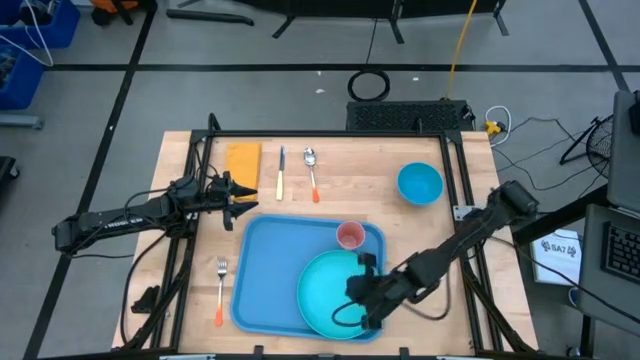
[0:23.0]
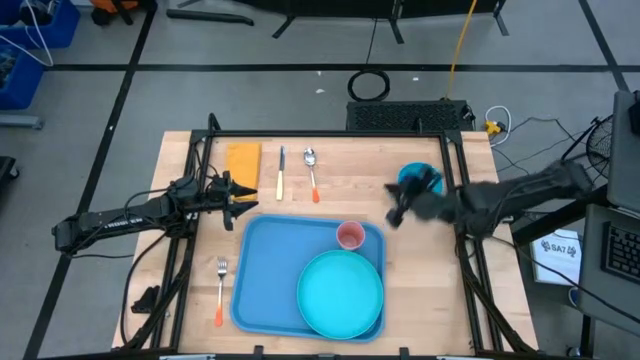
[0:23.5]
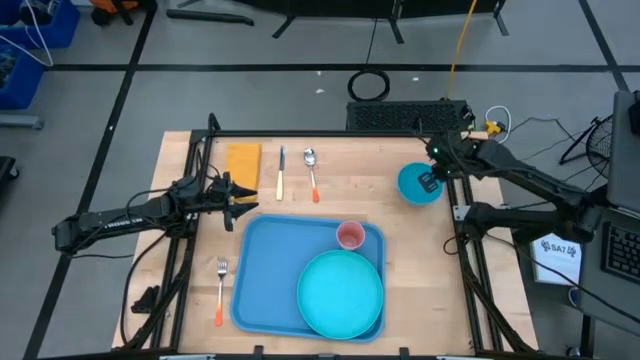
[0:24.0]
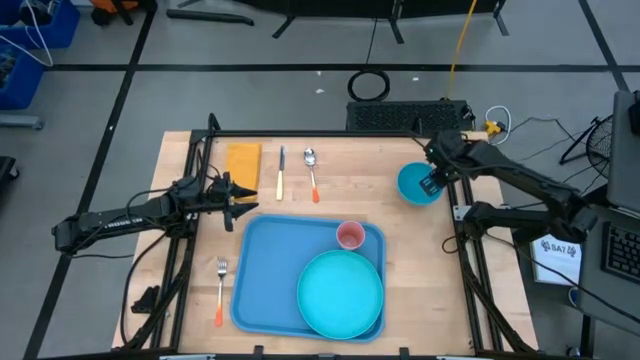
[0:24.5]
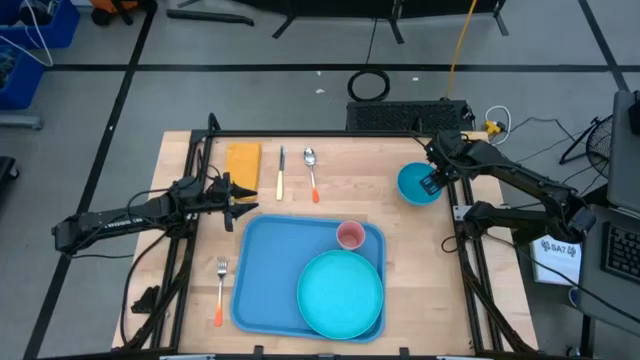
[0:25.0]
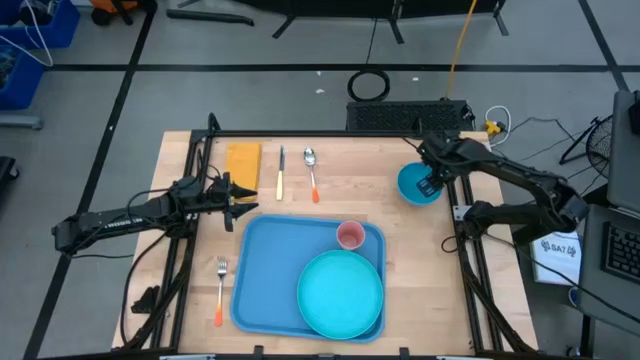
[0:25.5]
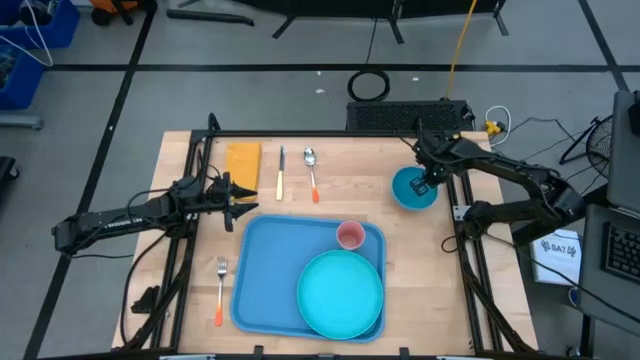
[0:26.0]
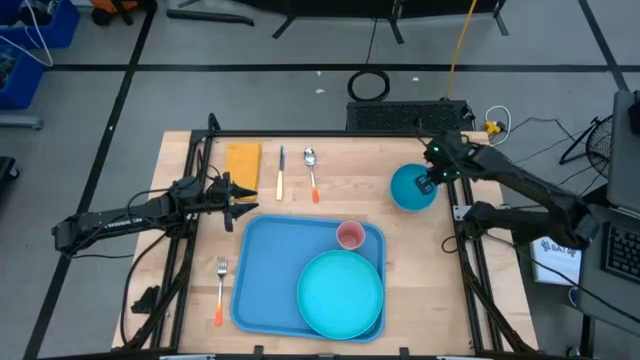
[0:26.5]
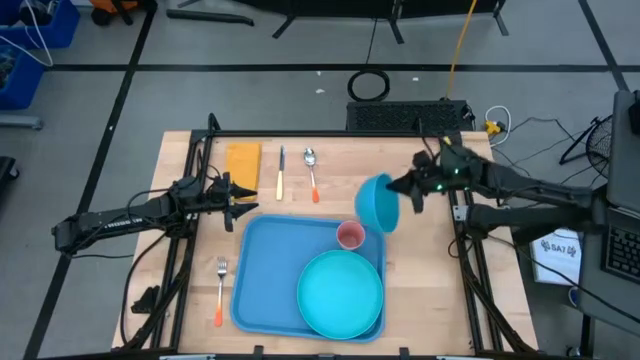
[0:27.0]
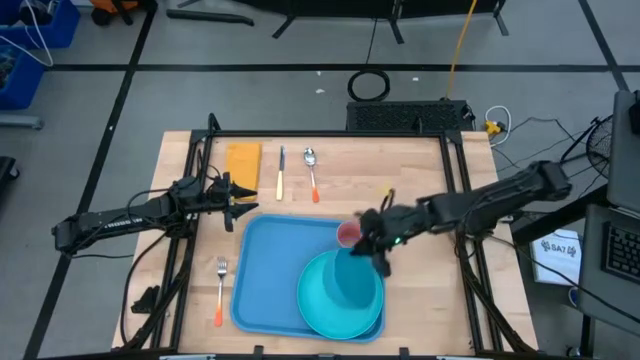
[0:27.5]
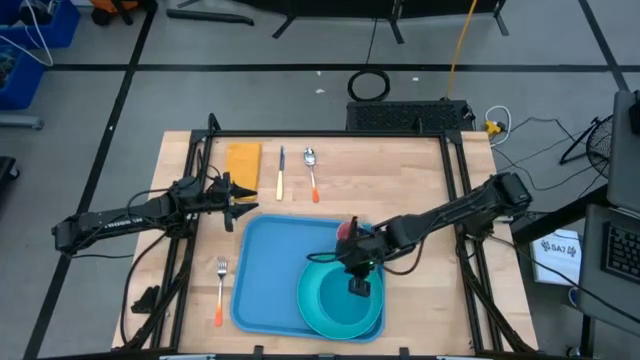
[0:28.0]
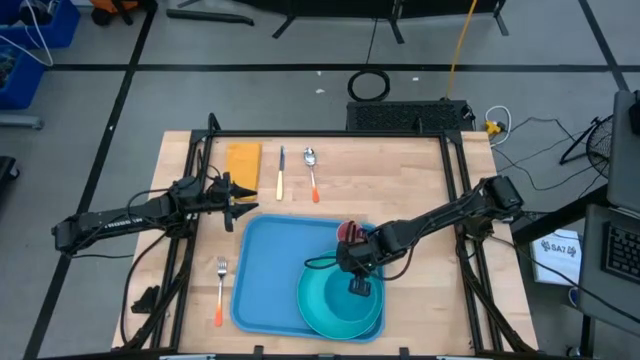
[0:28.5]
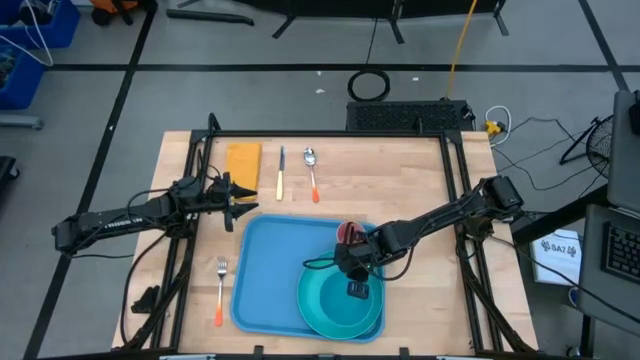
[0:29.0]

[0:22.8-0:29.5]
Task: Set up tray
Put the blue bowl on top of the light blue plate

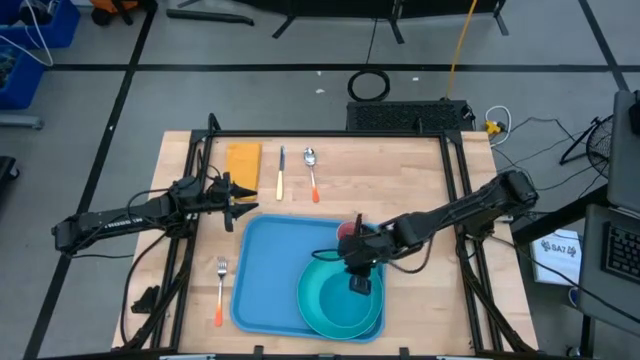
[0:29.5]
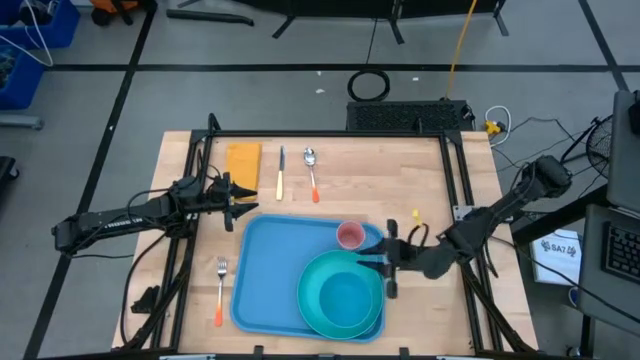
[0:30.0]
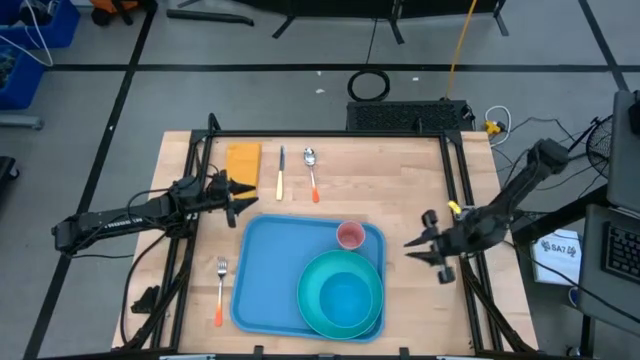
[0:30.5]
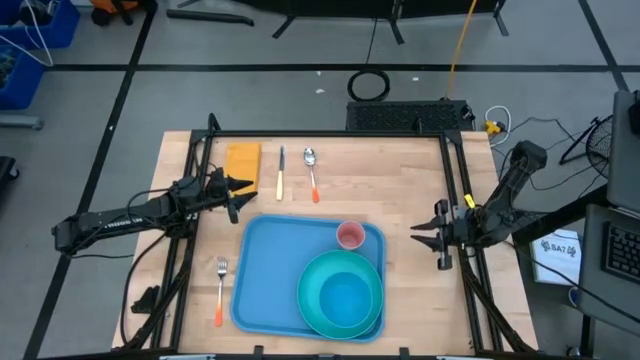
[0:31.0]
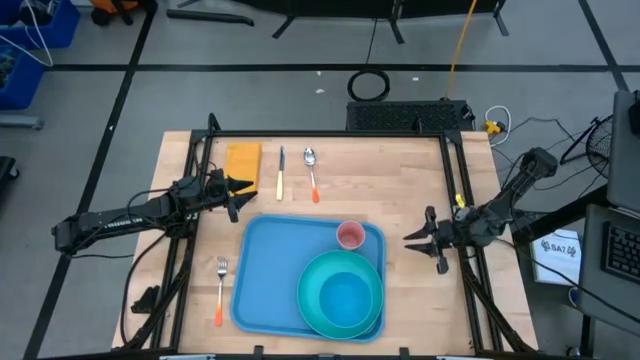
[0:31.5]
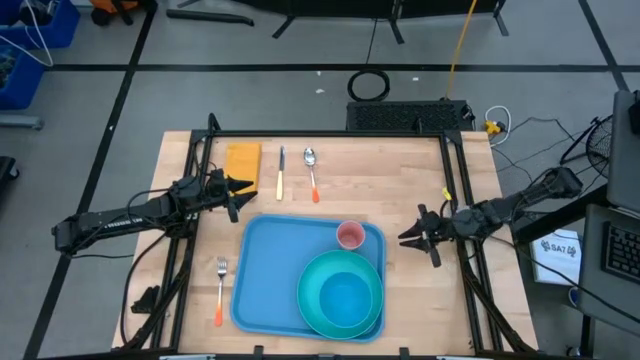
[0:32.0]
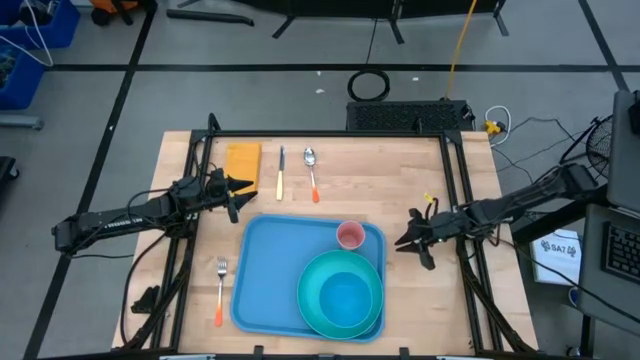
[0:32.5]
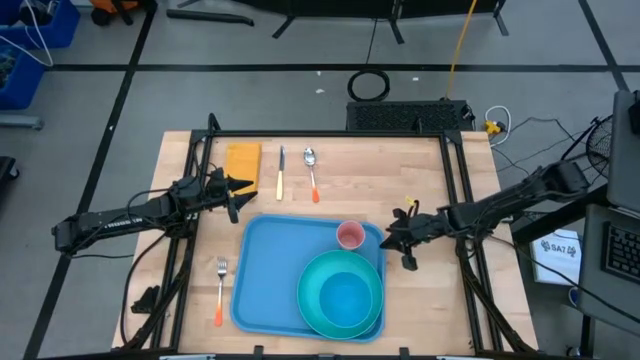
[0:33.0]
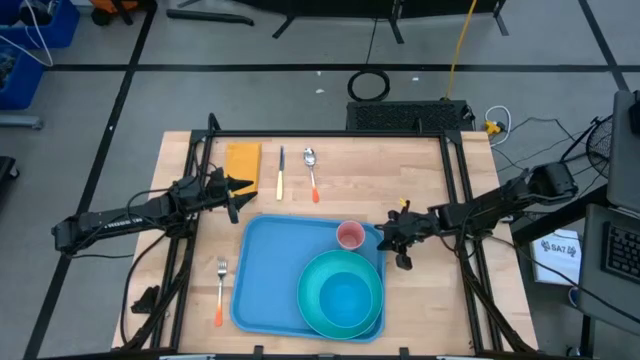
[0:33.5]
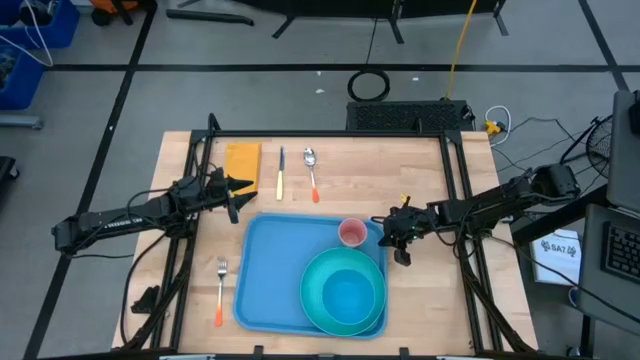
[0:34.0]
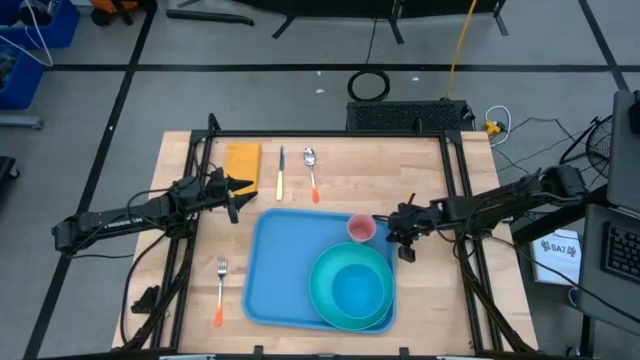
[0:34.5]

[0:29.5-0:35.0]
Adjust the blue serving tray on the table

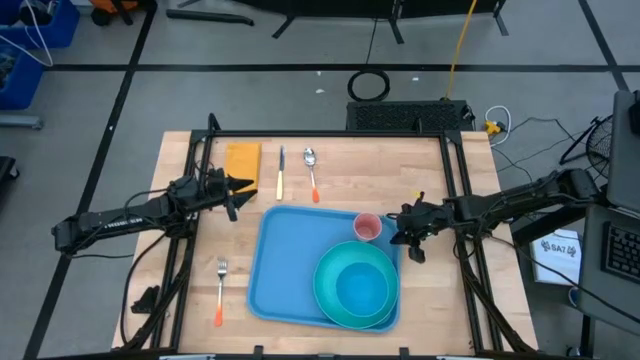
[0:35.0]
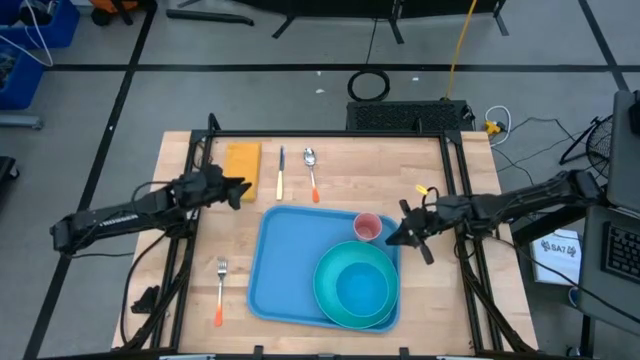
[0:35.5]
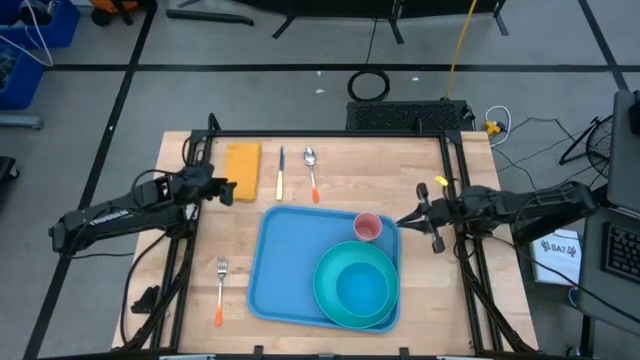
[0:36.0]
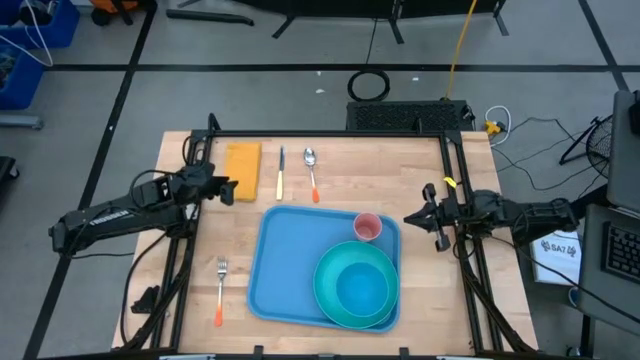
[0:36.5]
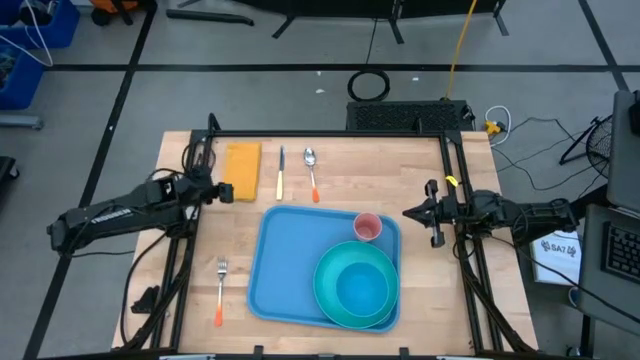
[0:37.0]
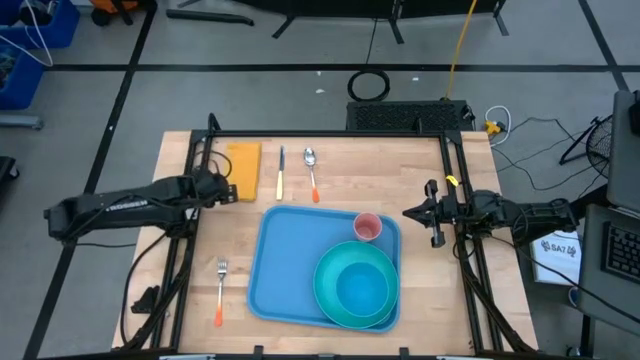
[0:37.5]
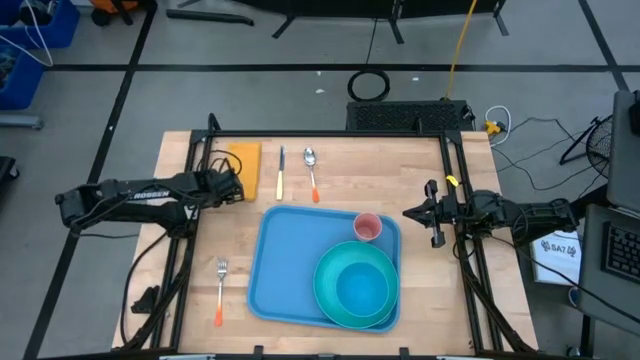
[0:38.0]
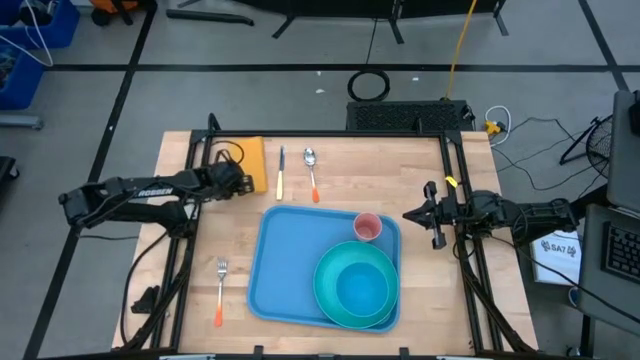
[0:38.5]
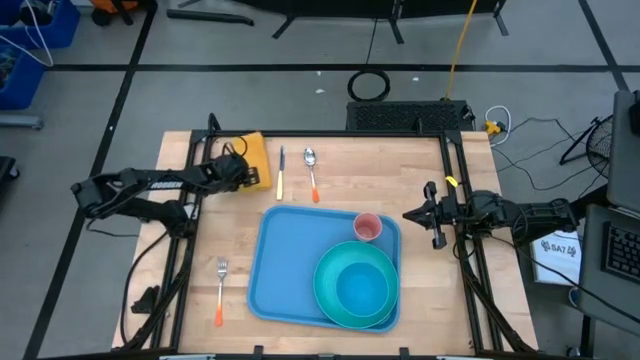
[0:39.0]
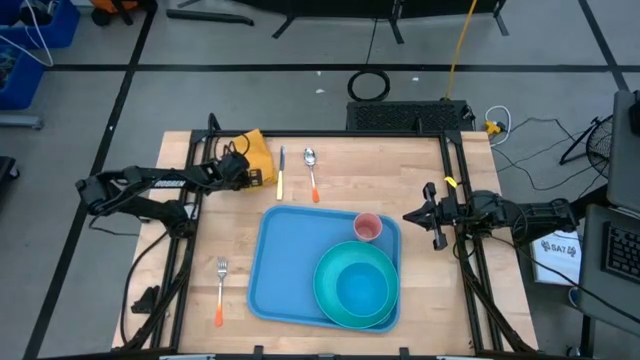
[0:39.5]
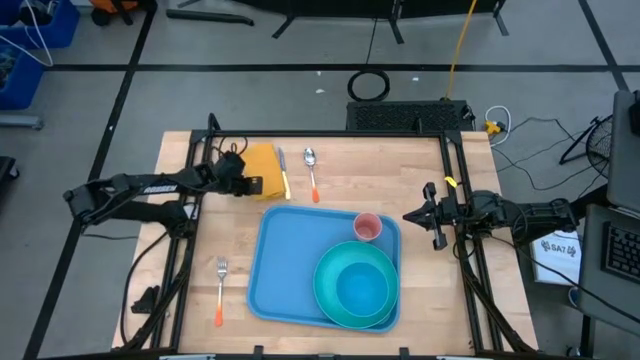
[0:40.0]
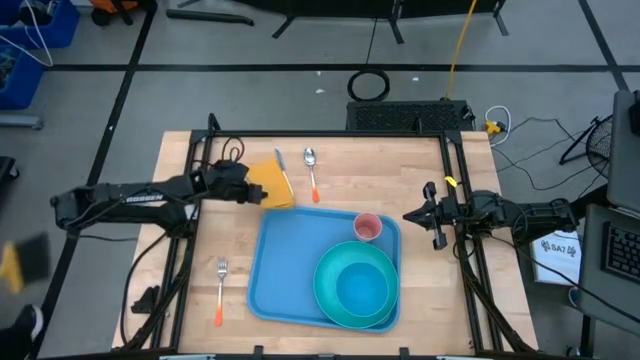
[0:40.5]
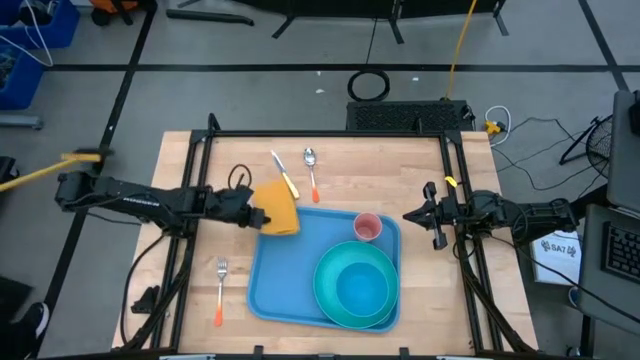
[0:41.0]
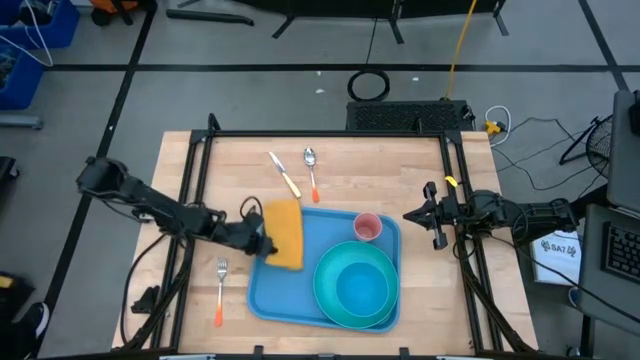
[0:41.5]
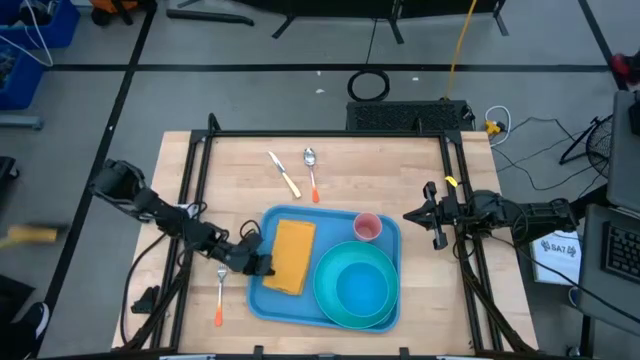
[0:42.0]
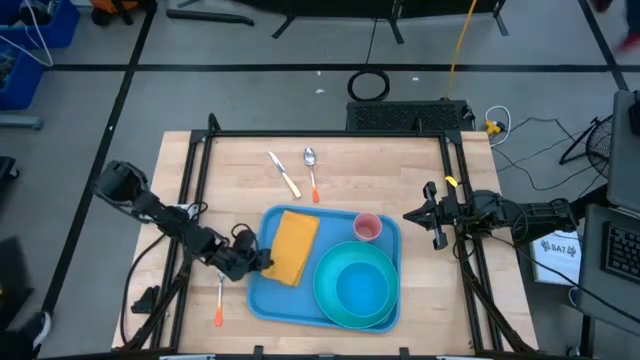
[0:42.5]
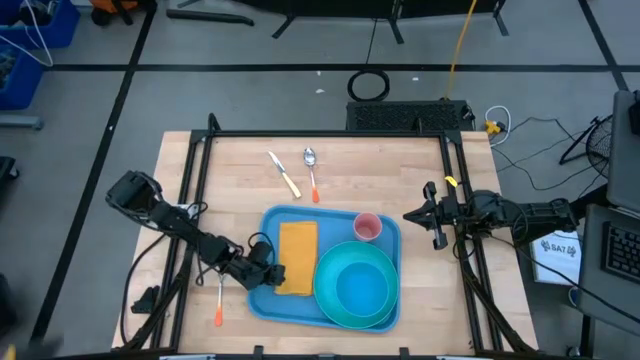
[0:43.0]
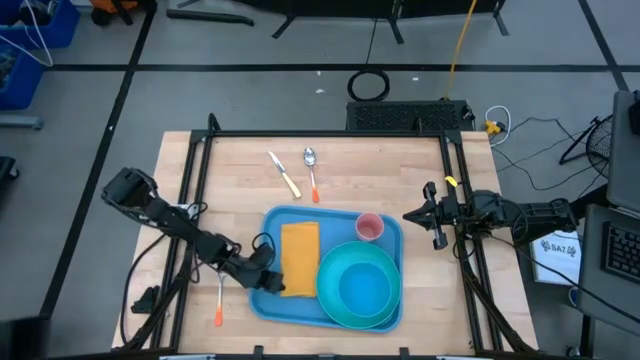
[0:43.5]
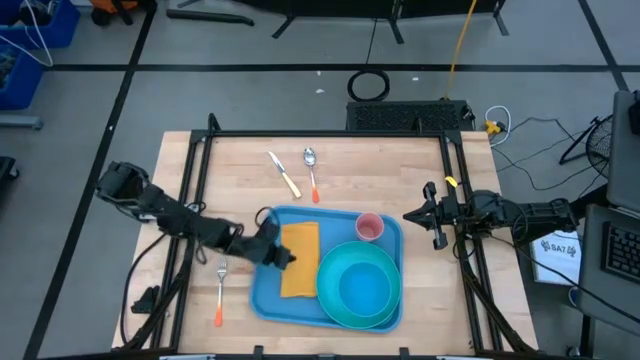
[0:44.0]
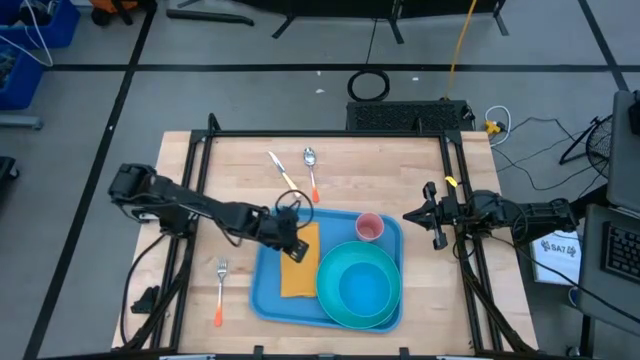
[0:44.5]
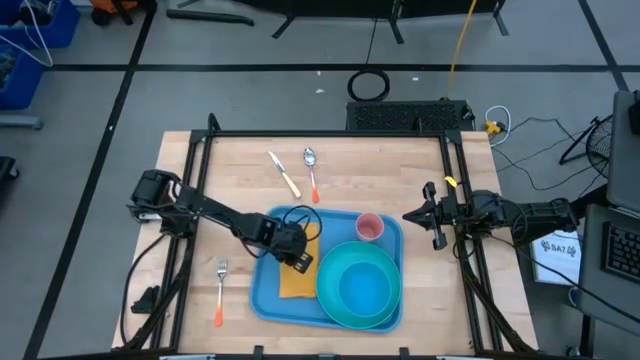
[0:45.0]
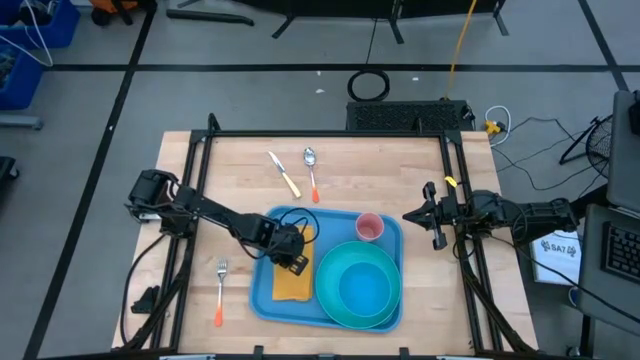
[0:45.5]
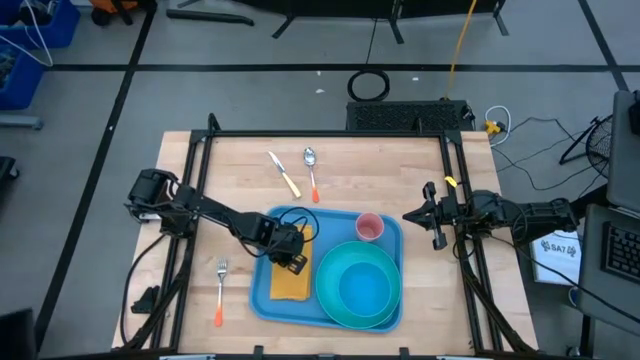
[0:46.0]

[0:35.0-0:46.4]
Put the yellow napkin on the blue serving tray to the left of the light blue plate
